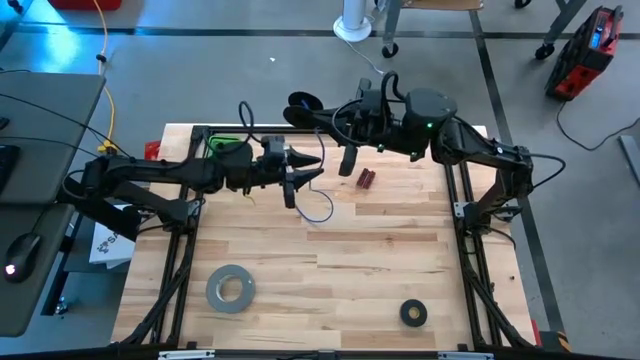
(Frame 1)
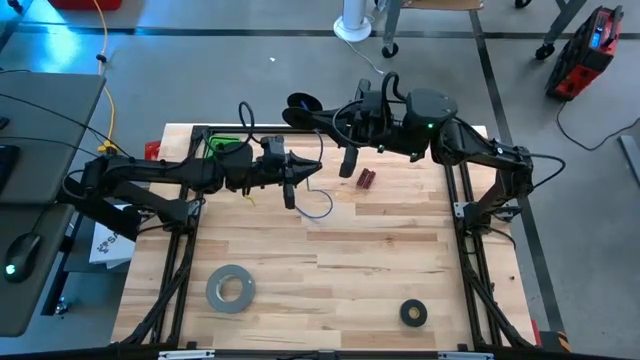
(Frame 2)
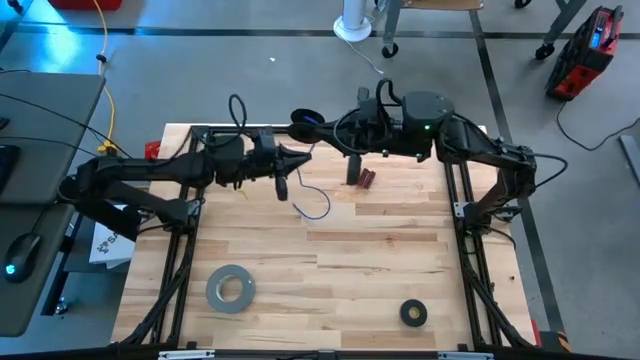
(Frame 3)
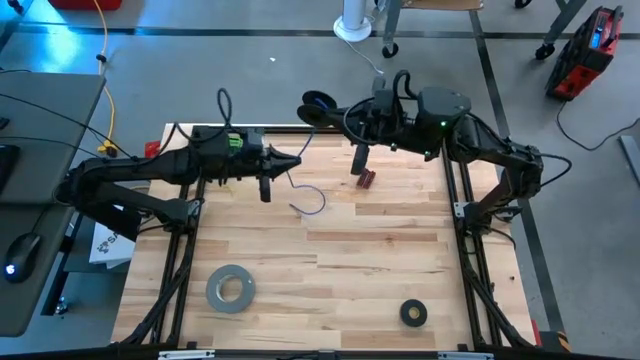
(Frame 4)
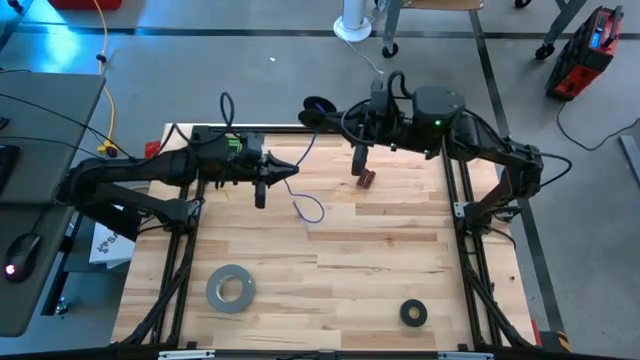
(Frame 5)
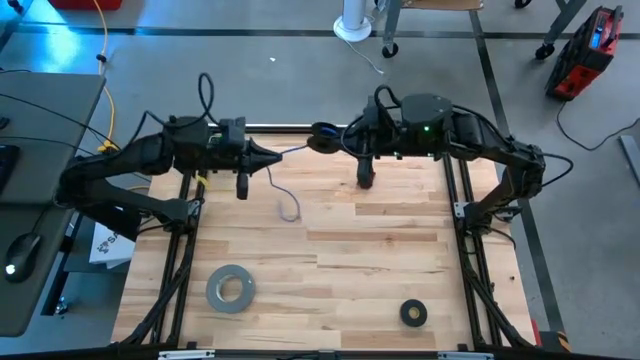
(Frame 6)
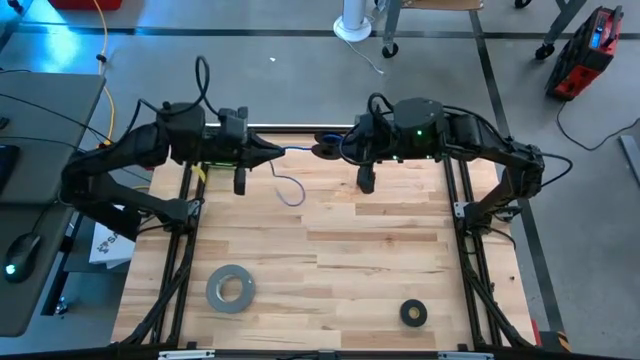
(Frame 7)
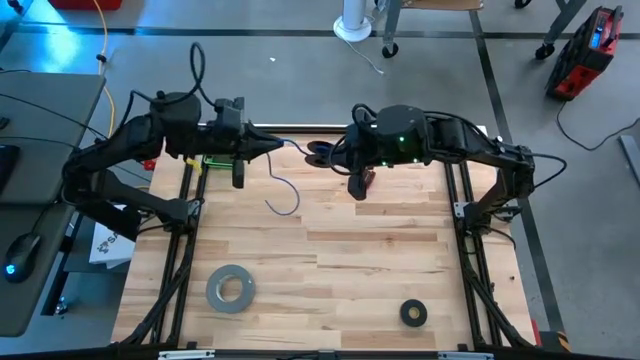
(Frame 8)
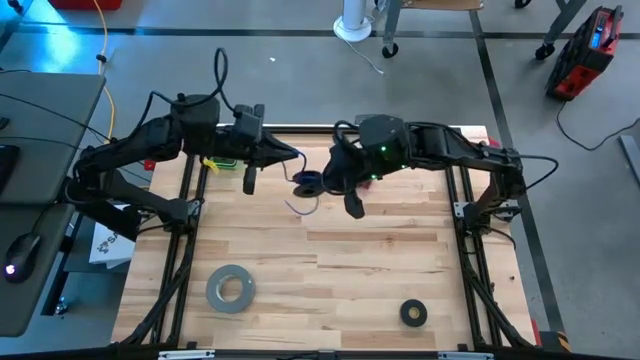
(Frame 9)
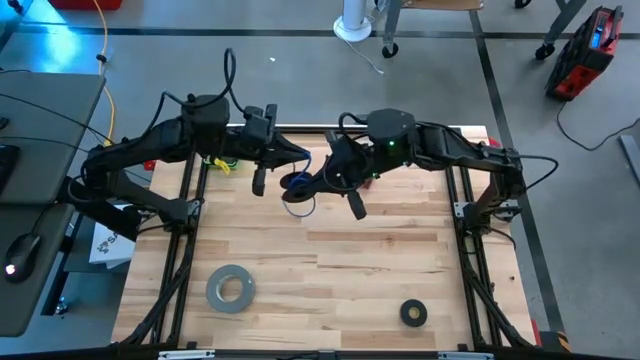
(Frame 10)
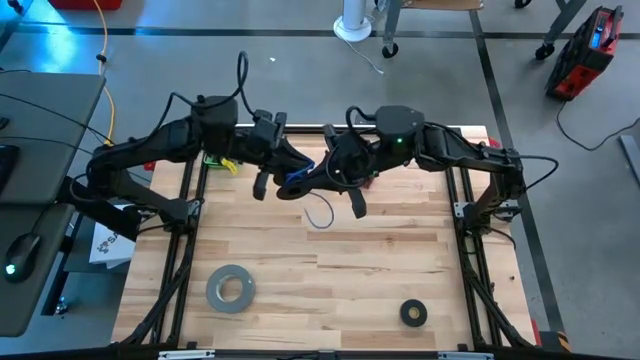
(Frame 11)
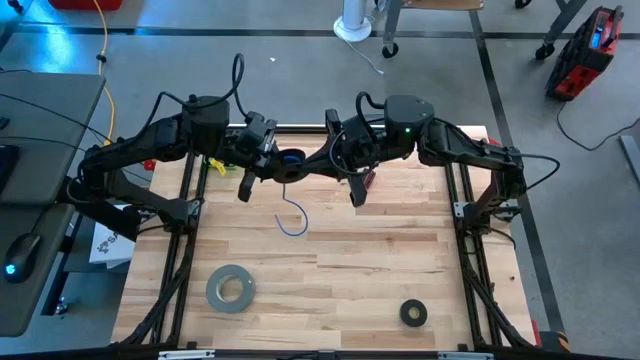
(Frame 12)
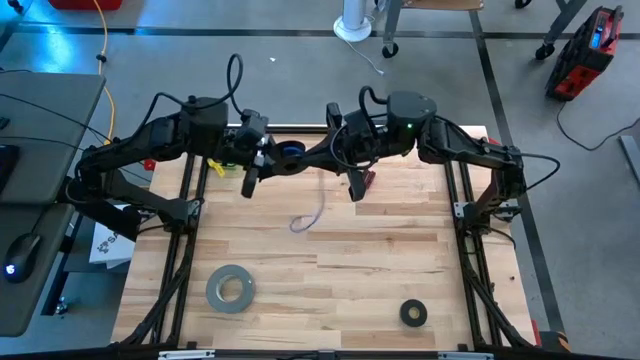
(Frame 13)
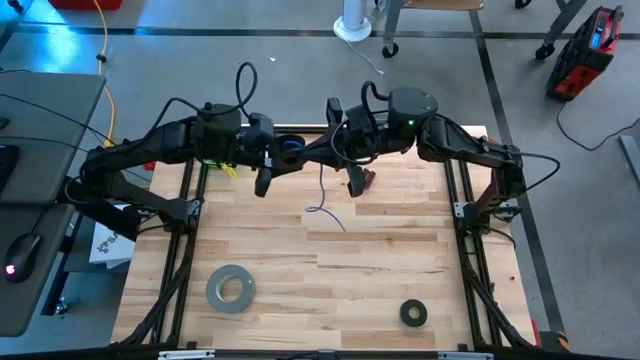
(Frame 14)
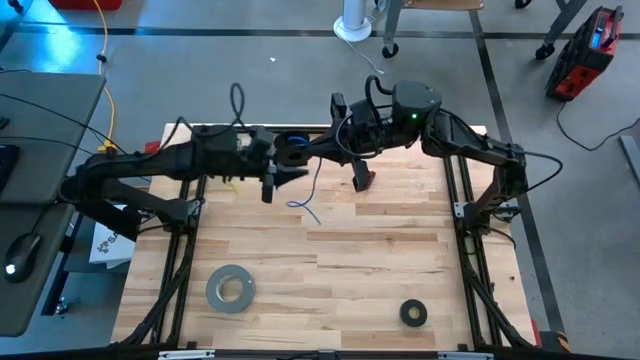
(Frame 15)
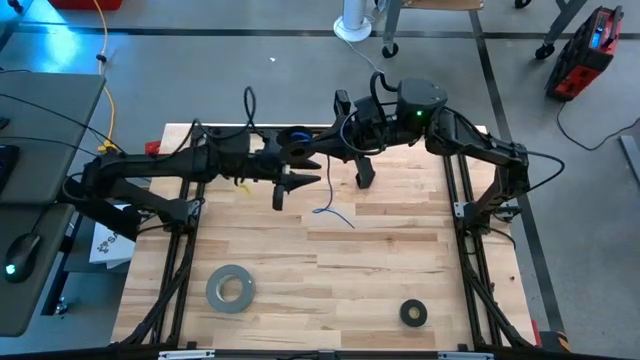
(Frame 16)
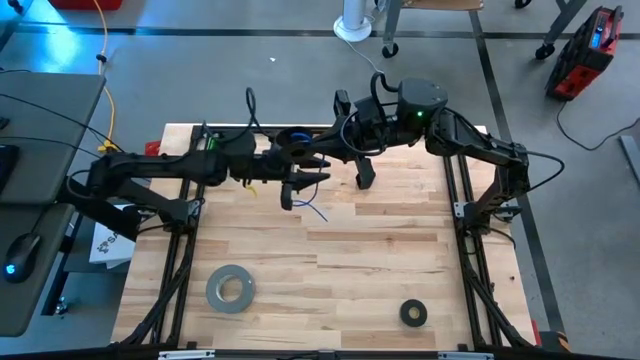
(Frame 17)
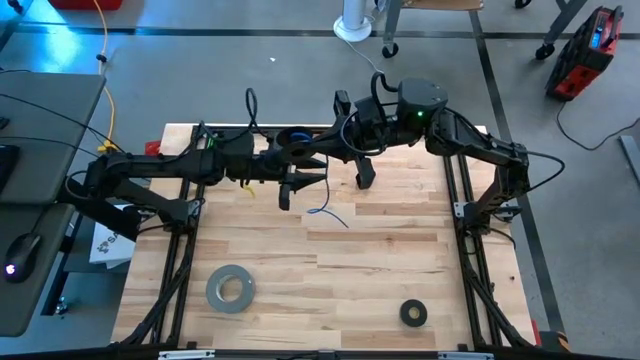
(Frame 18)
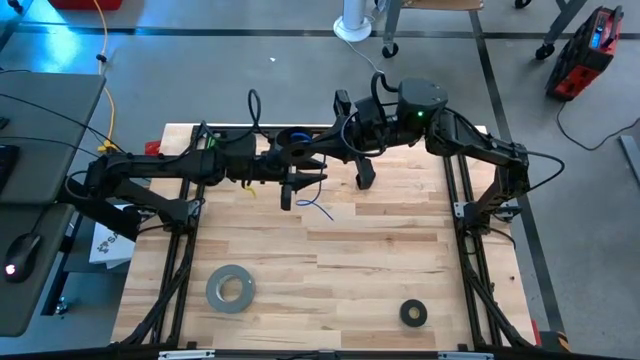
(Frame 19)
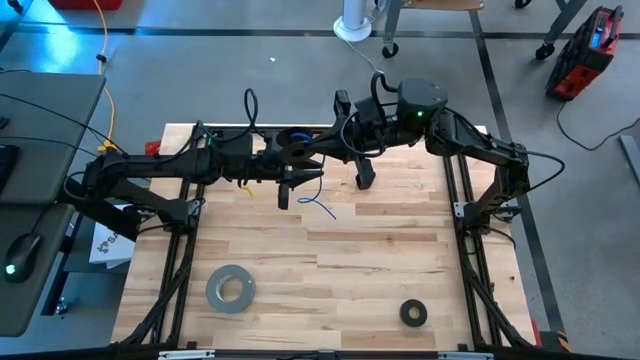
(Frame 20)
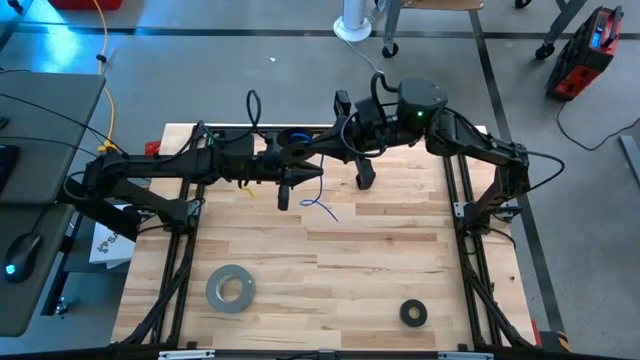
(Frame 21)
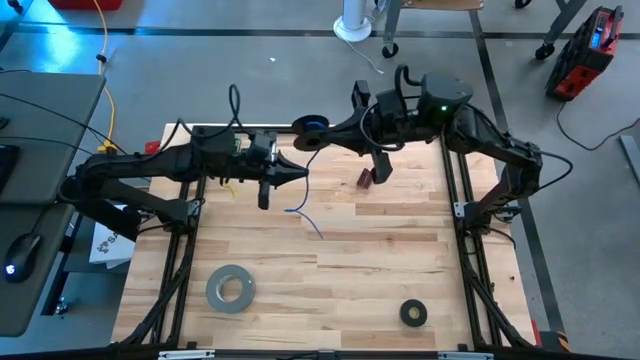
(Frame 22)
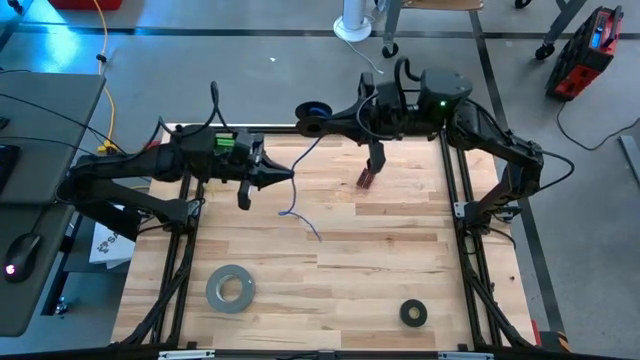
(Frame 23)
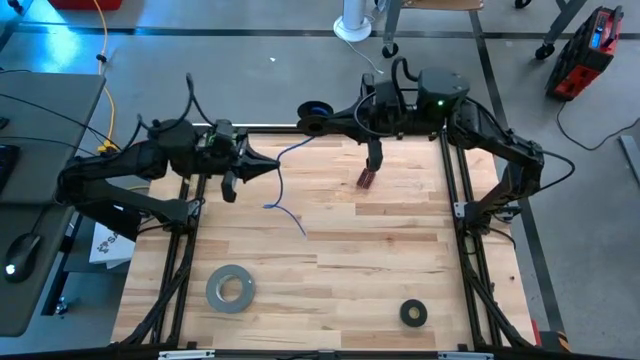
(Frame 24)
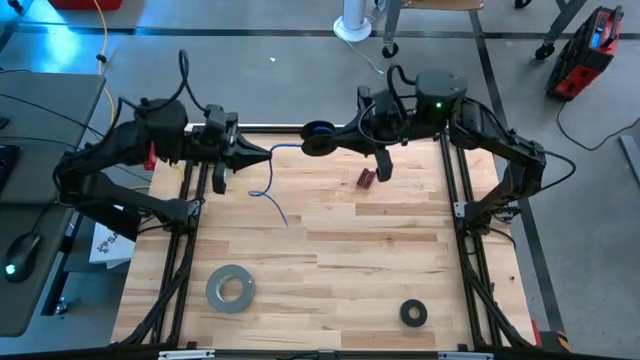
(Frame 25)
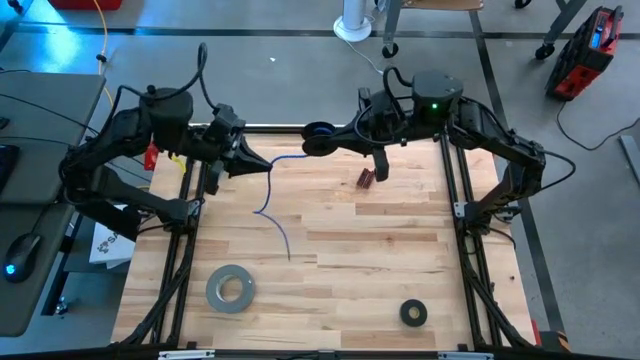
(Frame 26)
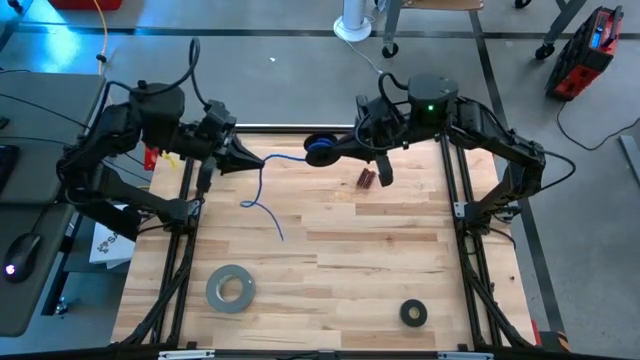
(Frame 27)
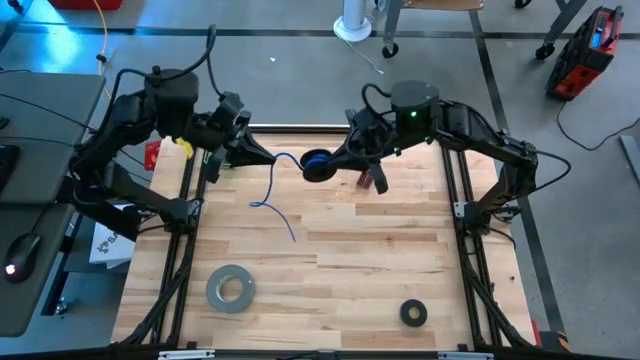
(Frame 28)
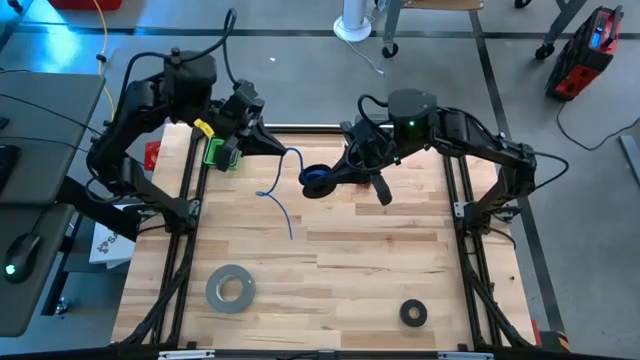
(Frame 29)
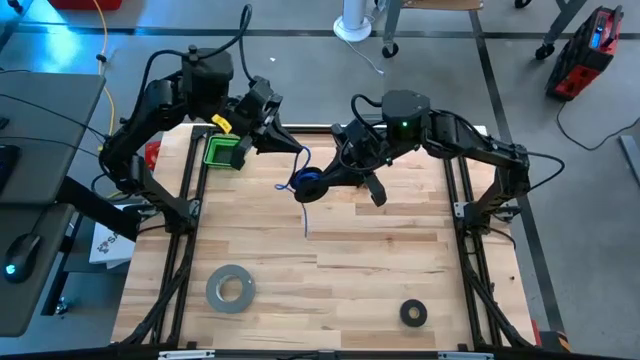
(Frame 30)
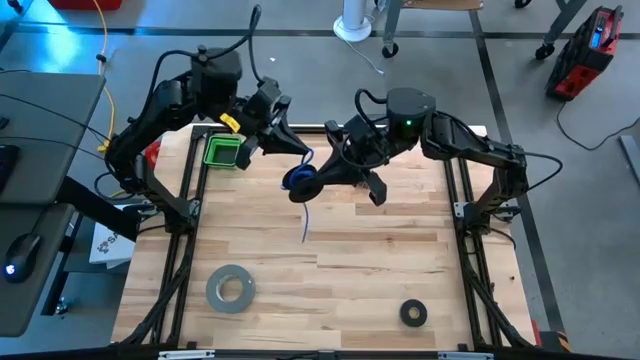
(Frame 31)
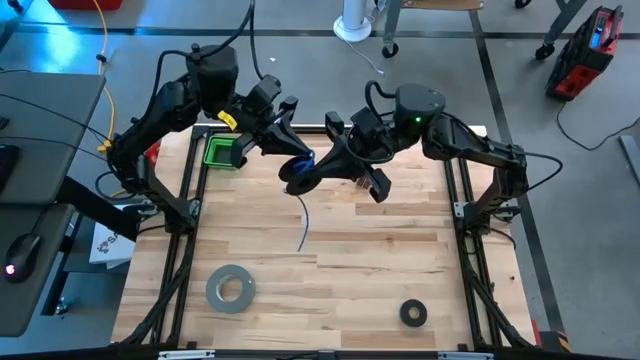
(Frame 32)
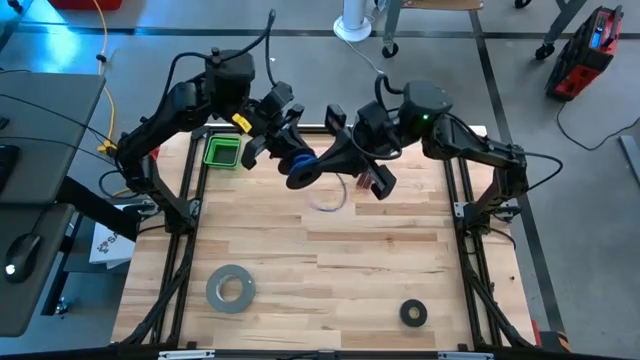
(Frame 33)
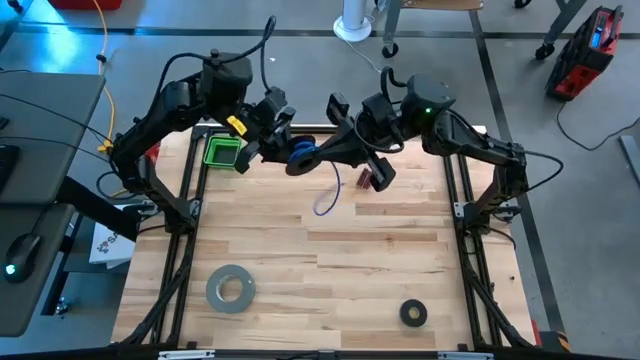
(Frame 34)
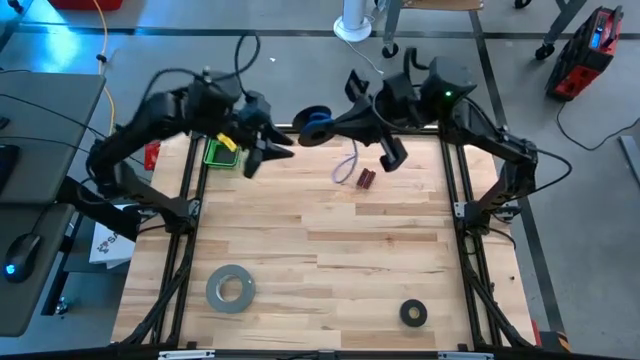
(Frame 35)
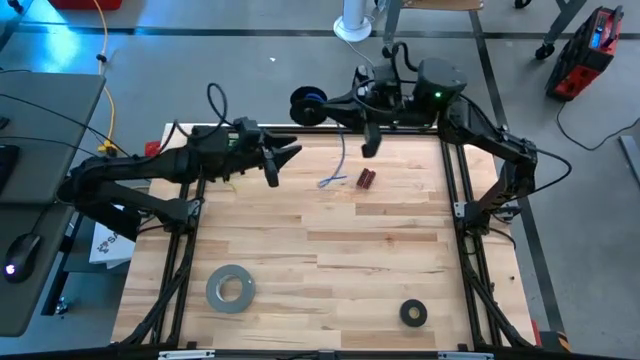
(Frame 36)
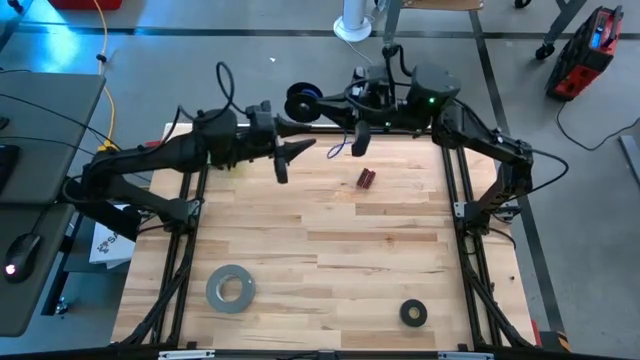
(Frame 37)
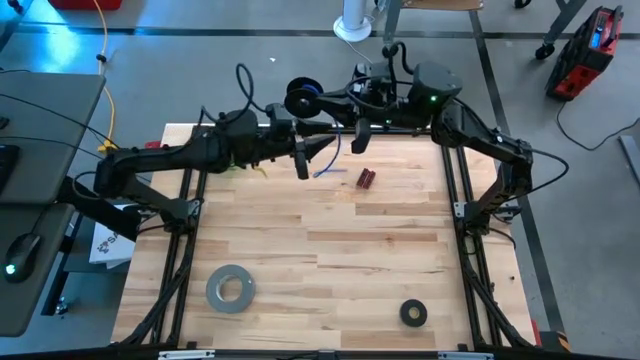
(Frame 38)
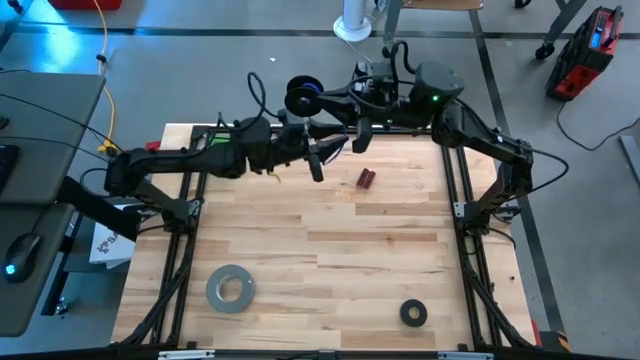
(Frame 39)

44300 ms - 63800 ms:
Task: Coil cords
Coil the blue wire onto a spool
